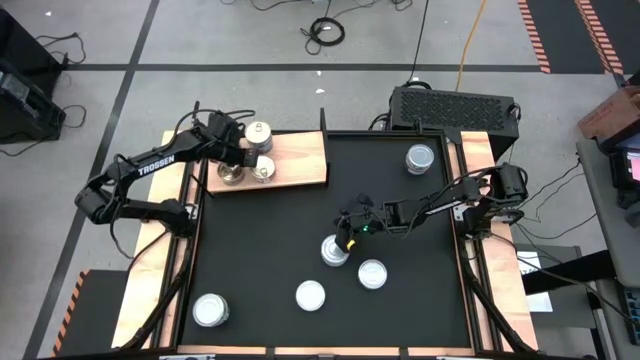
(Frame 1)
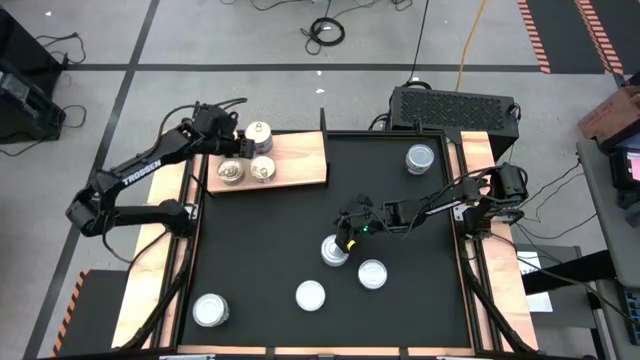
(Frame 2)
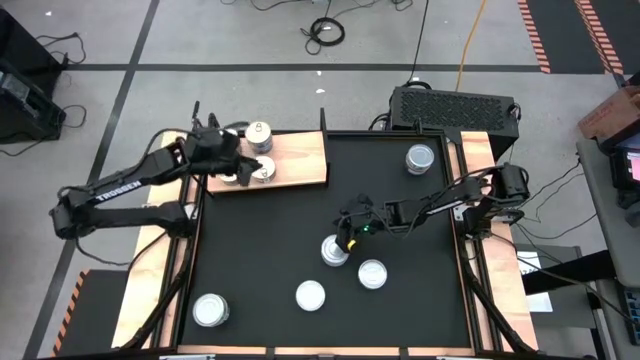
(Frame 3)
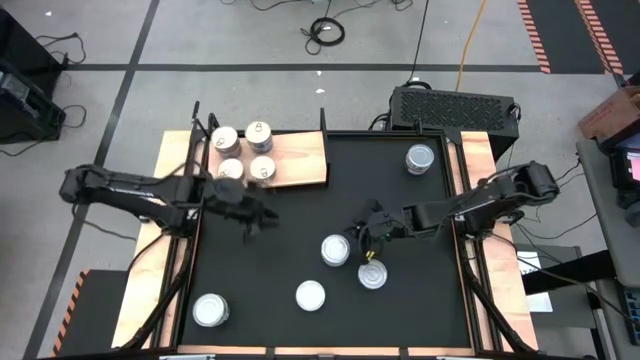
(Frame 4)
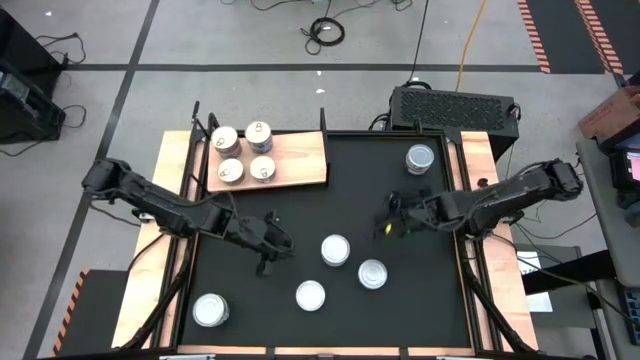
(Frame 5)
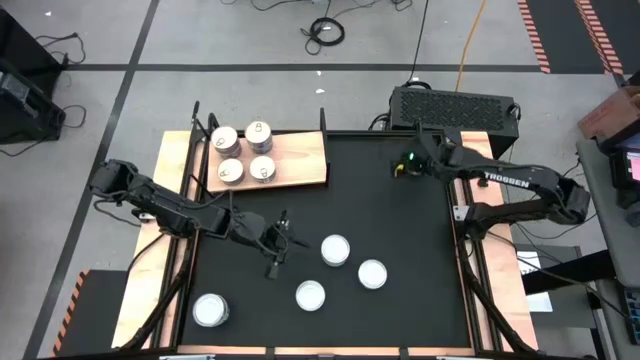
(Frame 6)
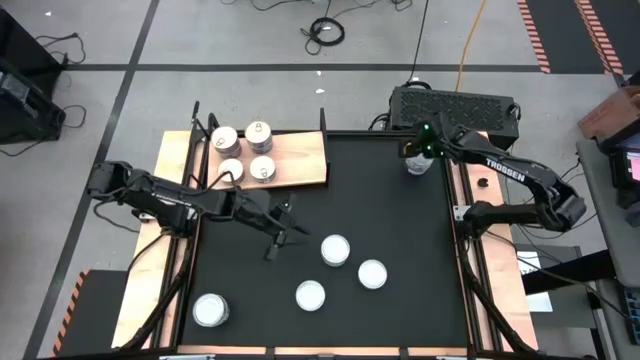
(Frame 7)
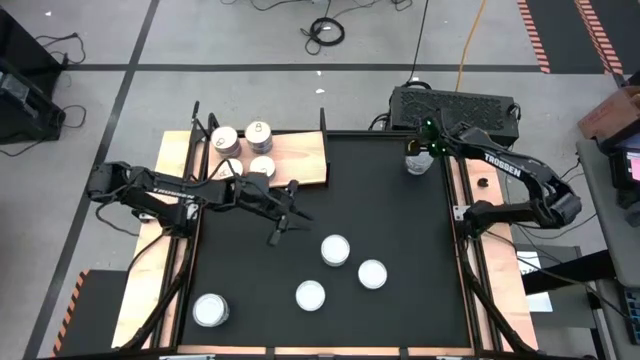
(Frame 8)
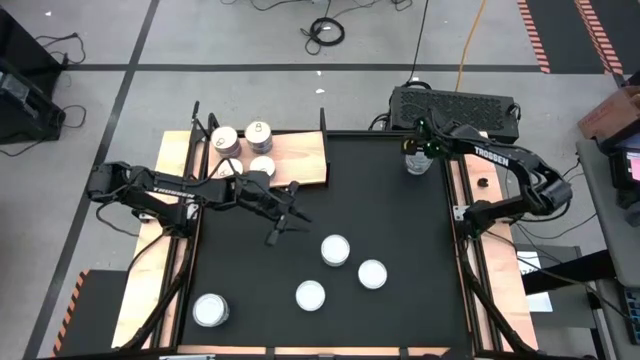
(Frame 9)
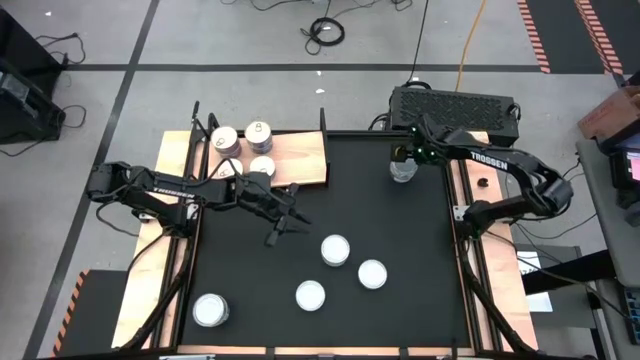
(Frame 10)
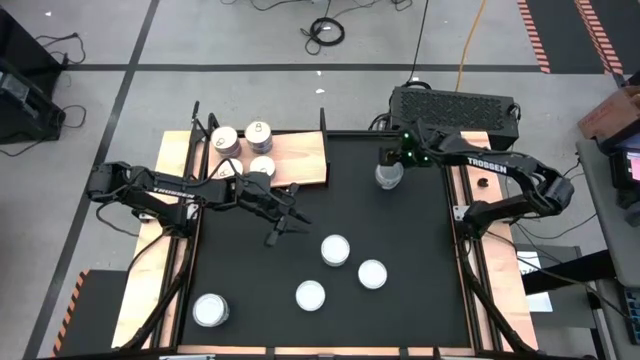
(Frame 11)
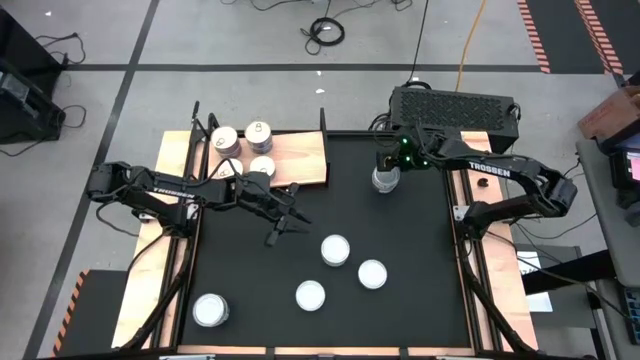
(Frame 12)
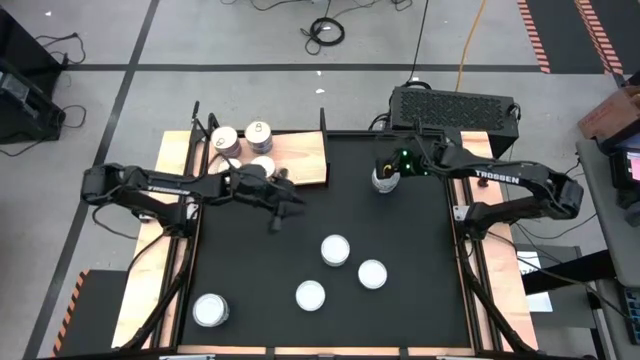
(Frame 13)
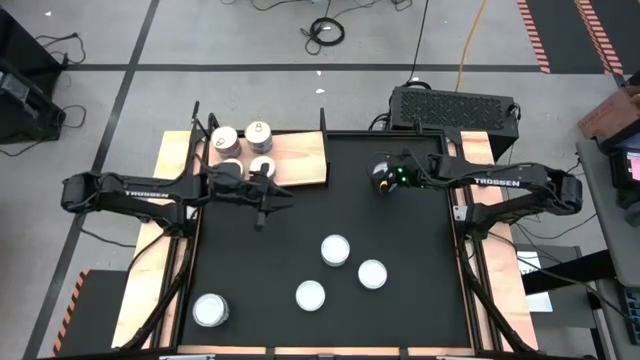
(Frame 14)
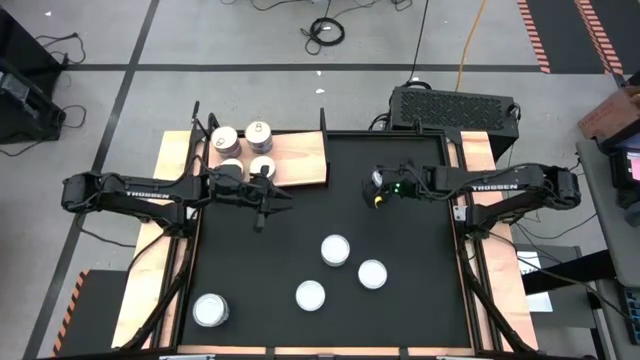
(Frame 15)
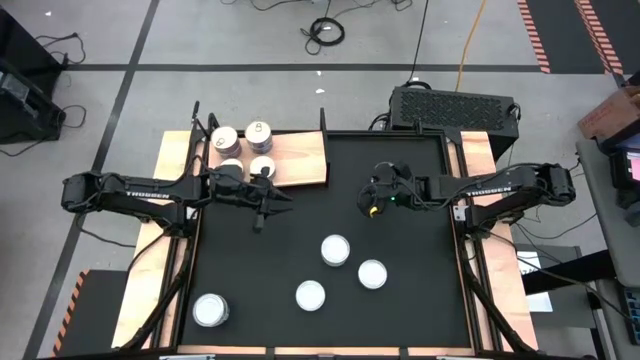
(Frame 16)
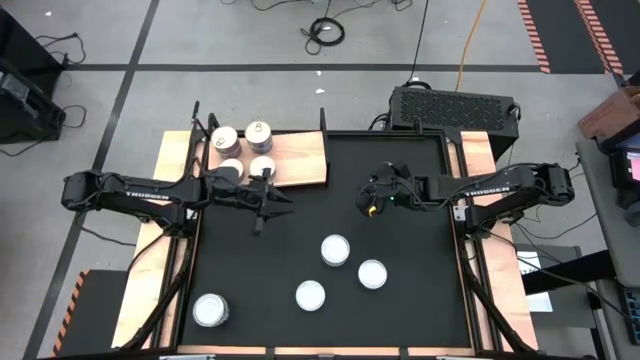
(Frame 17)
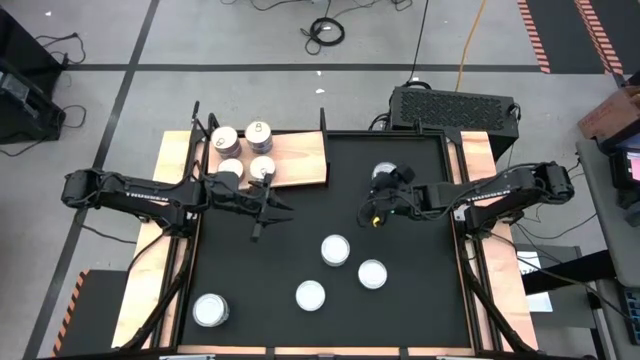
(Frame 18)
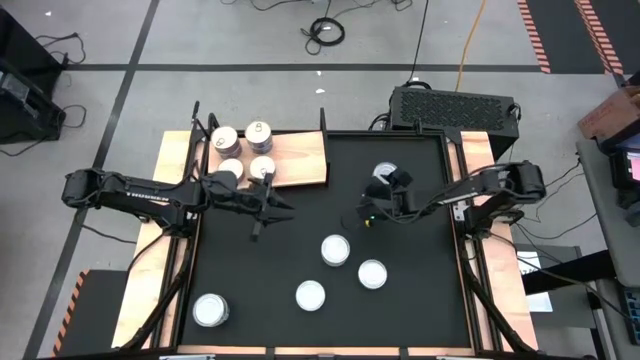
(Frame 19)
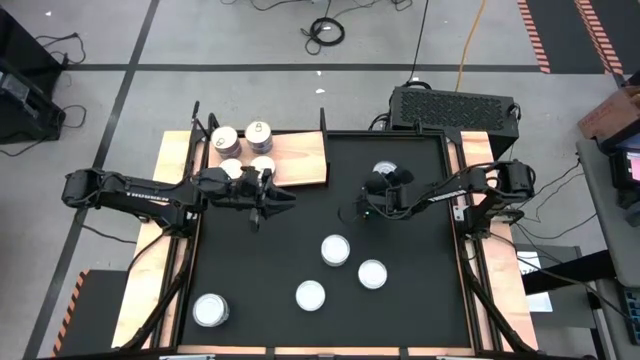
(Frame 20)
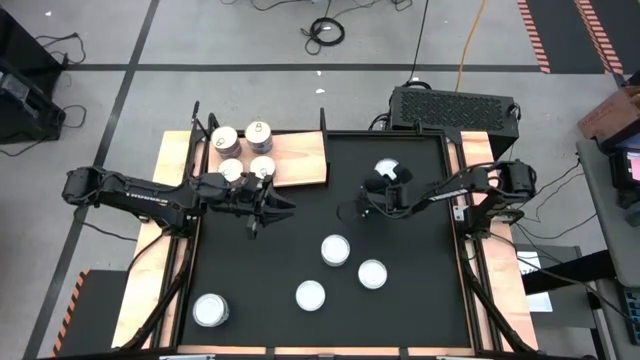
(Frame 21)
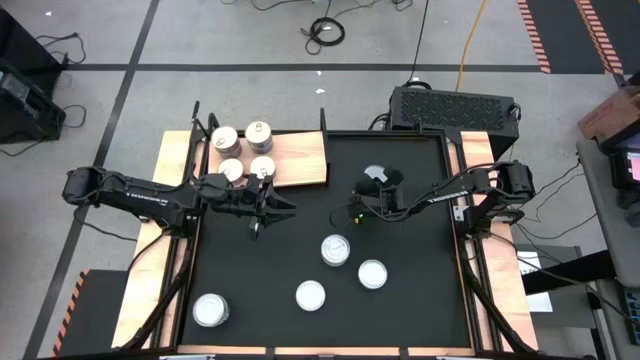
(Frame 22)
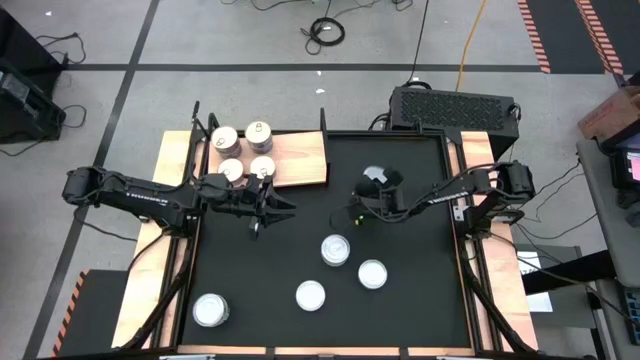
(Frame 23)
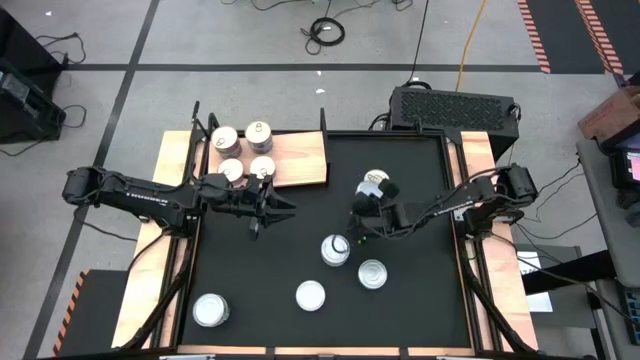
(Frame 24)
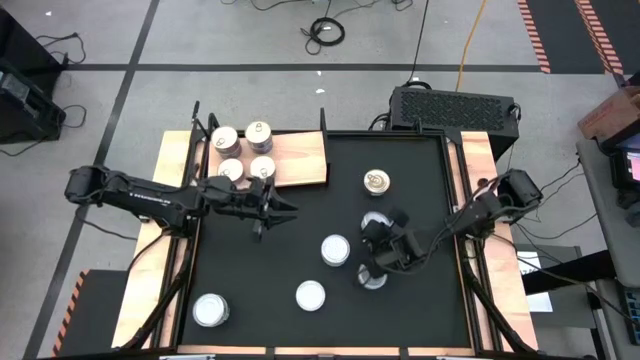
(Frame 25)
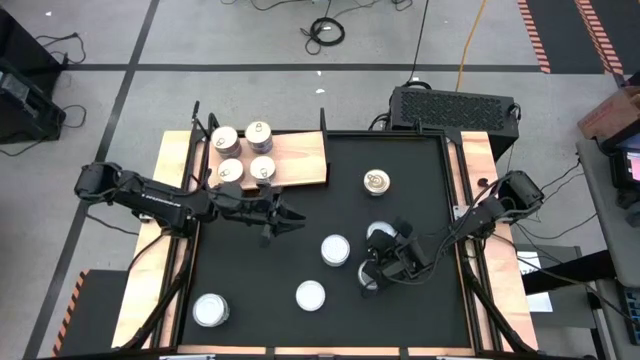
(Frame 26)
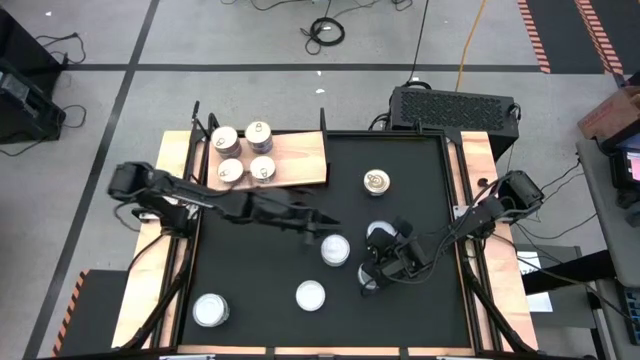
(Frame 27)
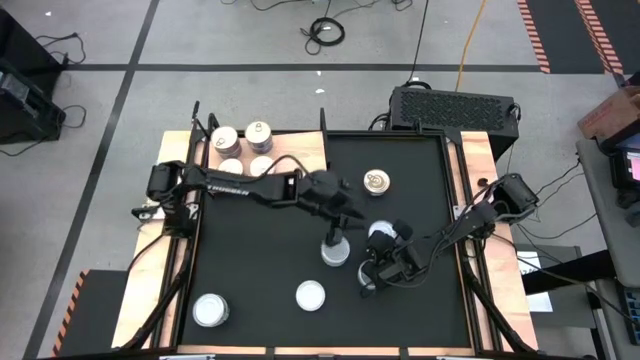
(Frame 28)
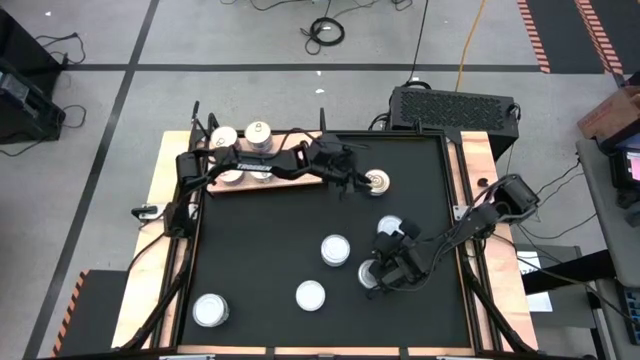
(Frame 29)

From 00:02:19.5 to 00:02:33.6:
Task: Stack canned seafood by type on shelf
Remove the green and white tuna can from the top of the blue and pink tuna can on the table

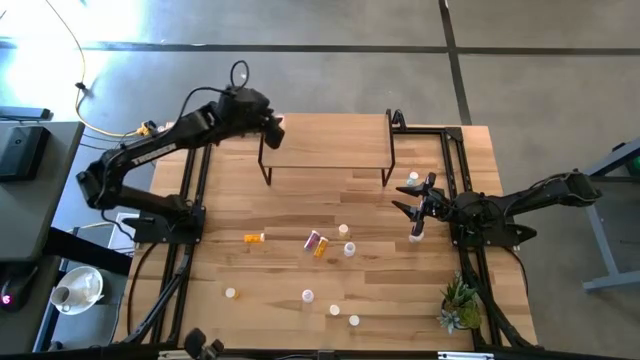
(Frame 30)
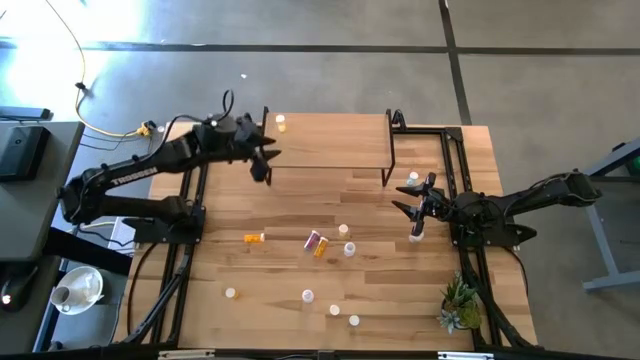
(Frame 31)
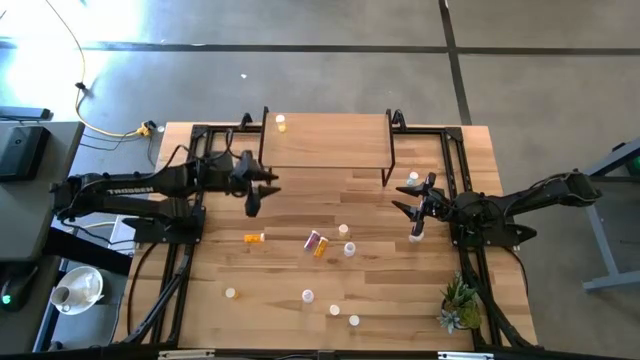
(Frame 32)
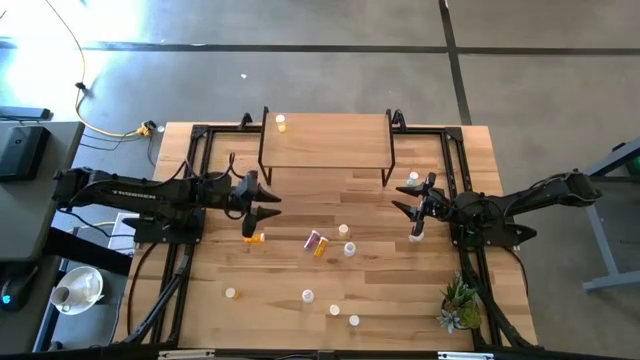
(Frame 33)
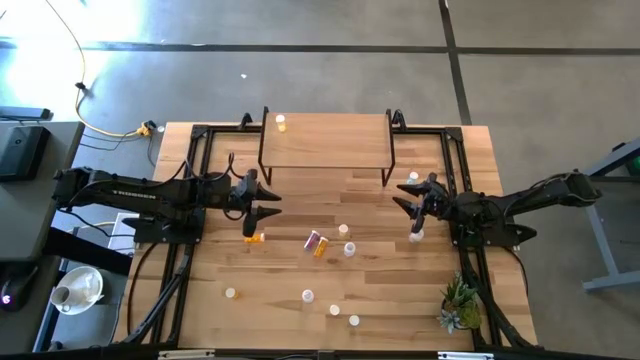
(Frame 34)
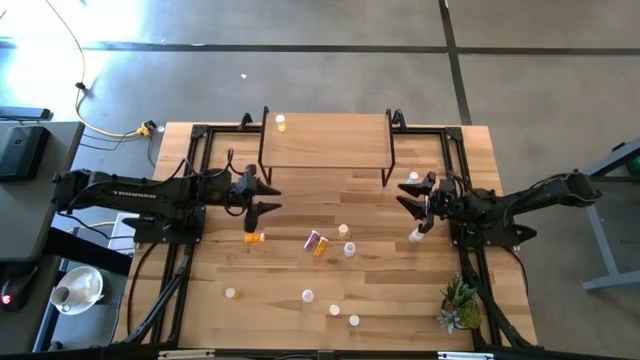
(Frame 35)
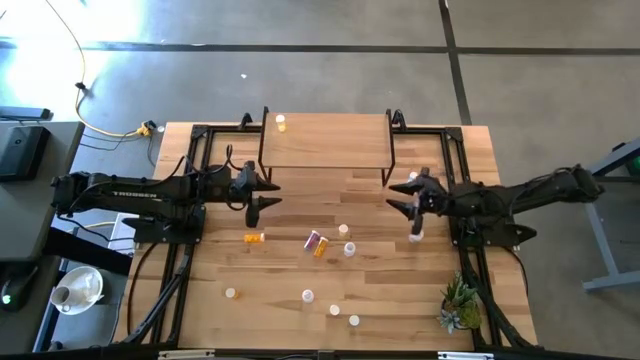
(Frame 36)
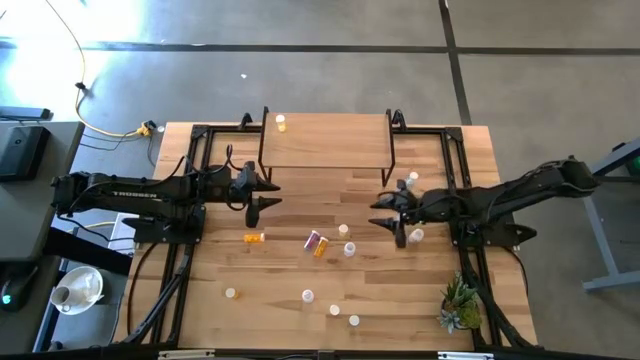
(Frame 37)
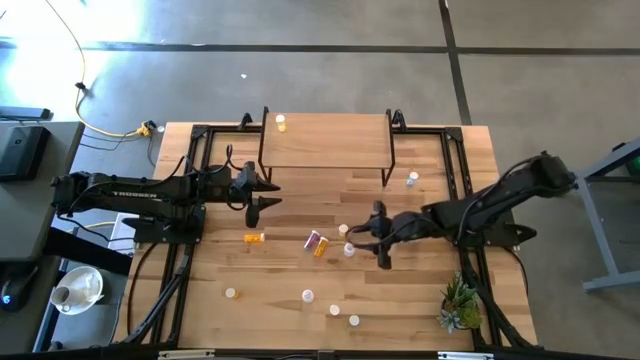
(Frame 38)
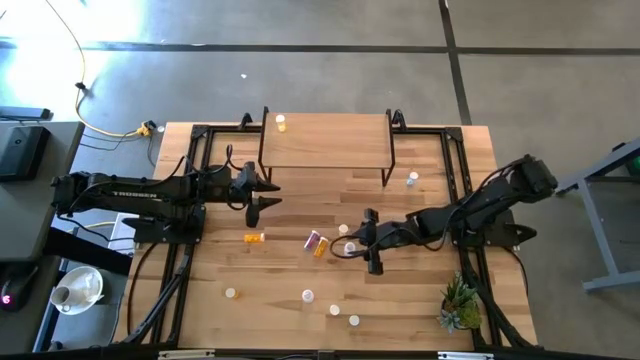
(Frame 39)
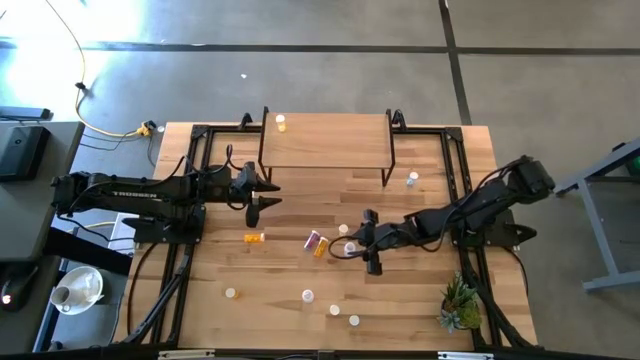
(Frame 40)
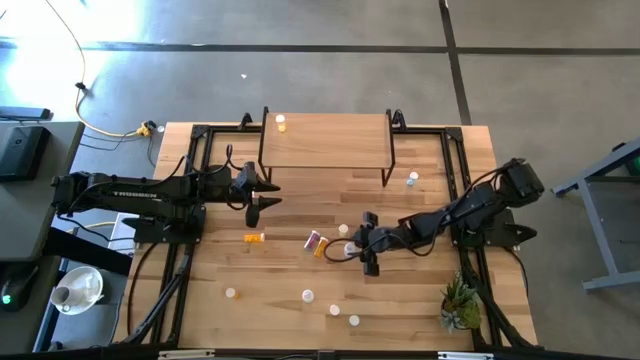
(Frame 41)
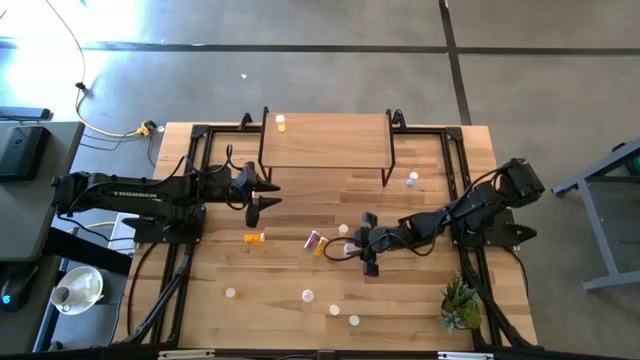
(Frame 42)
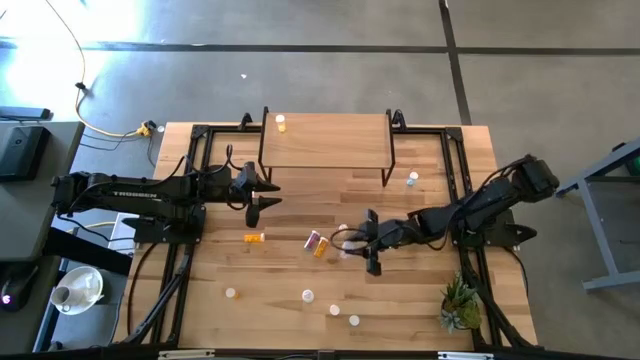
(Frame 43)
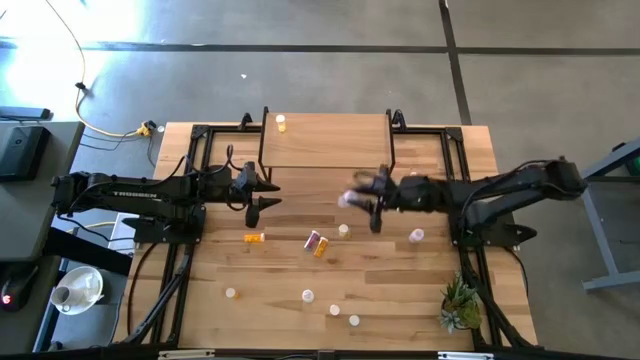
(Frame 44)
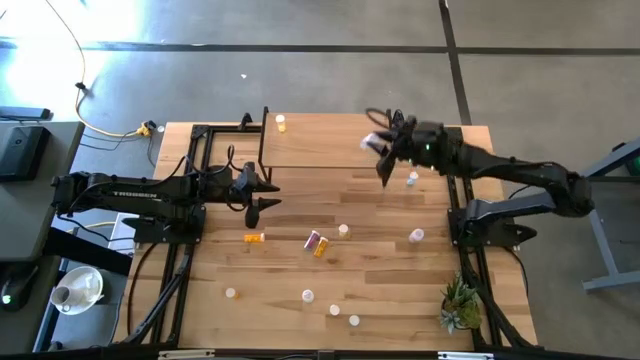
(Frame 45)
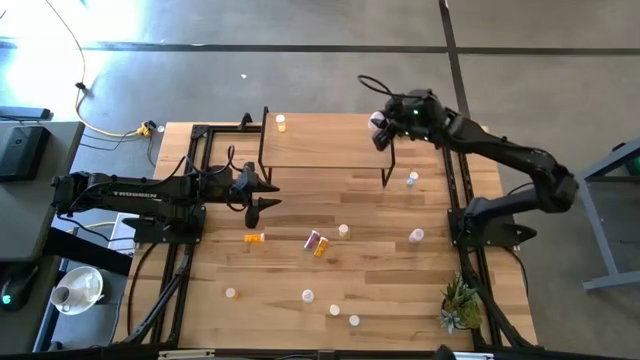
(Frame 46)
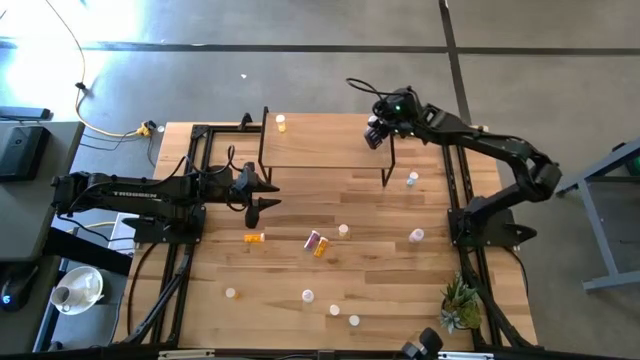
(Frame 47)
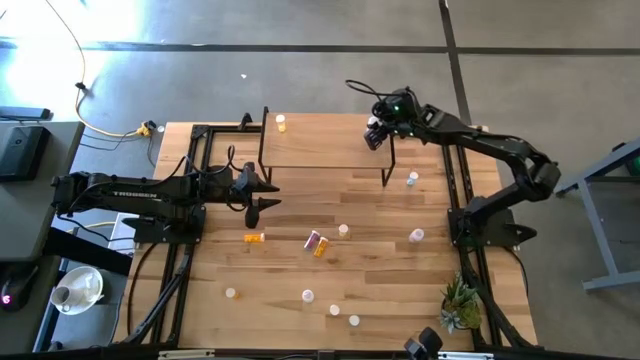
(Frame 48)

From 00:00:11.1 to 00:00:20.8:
Task: Pick and place medicine bottles onto shelf by color
Put the top left transparent pill bottle on the shelf
